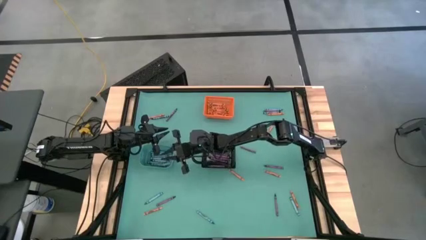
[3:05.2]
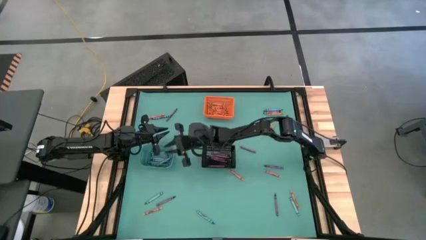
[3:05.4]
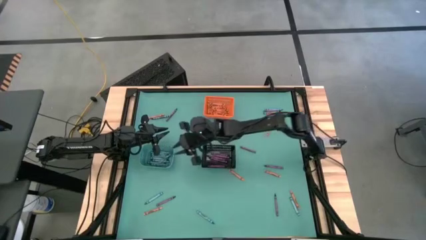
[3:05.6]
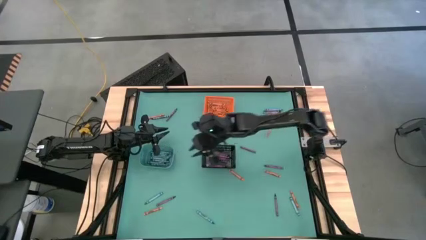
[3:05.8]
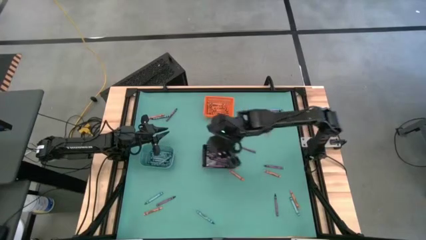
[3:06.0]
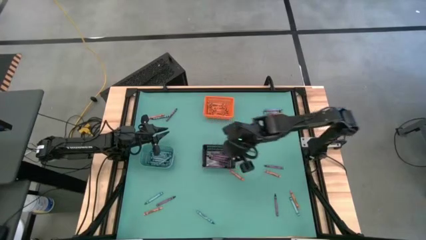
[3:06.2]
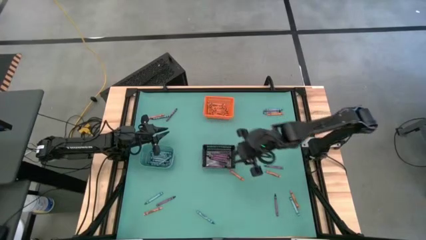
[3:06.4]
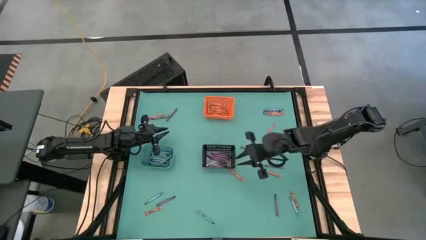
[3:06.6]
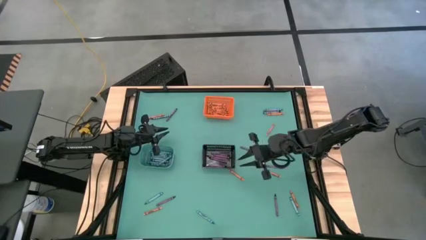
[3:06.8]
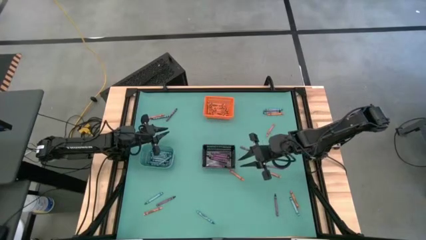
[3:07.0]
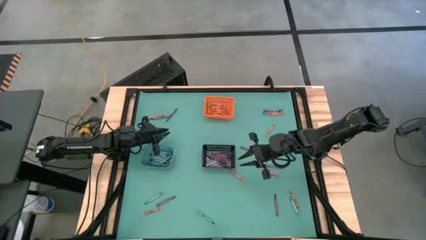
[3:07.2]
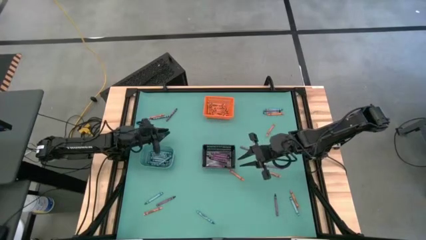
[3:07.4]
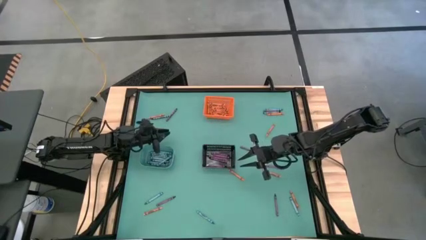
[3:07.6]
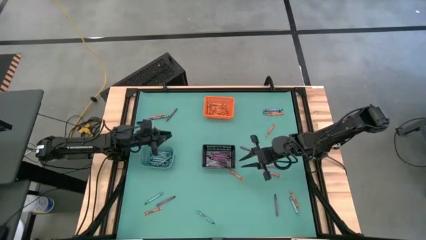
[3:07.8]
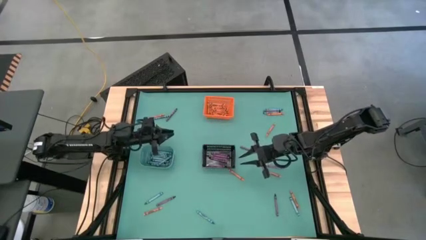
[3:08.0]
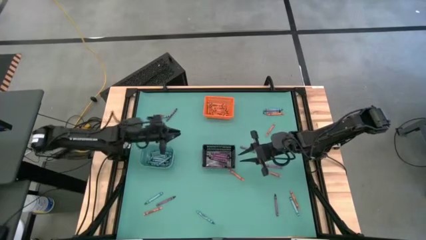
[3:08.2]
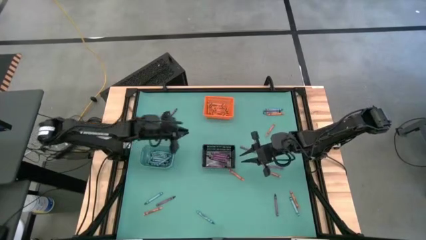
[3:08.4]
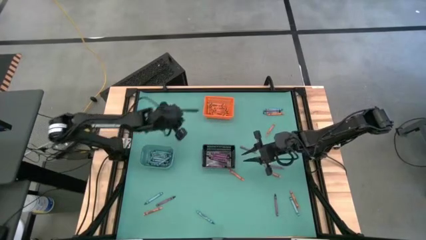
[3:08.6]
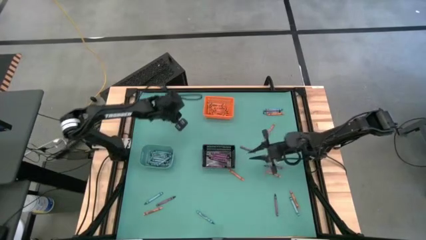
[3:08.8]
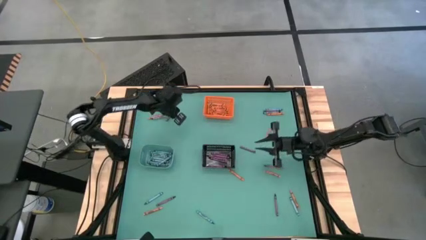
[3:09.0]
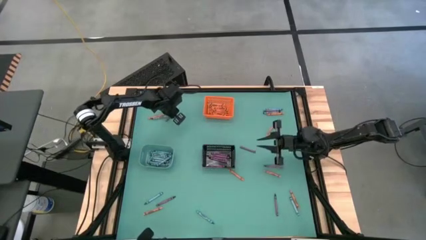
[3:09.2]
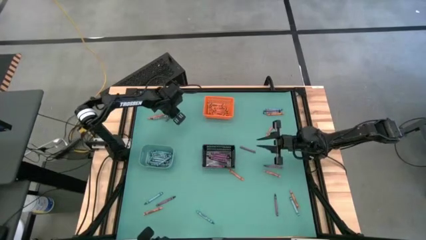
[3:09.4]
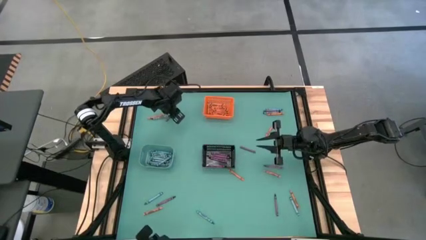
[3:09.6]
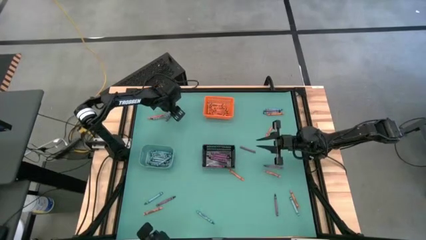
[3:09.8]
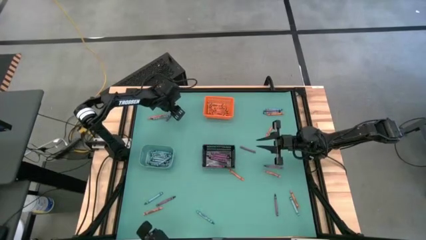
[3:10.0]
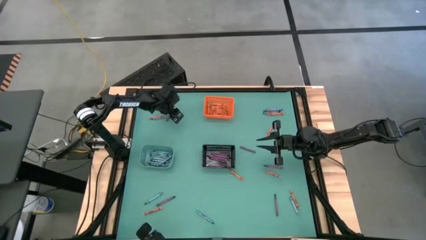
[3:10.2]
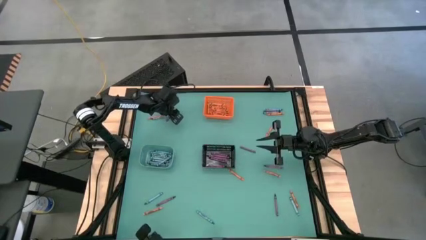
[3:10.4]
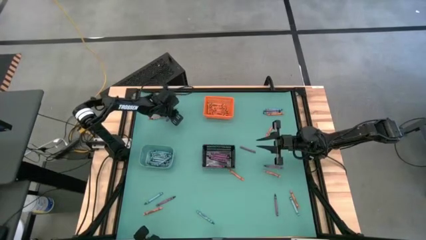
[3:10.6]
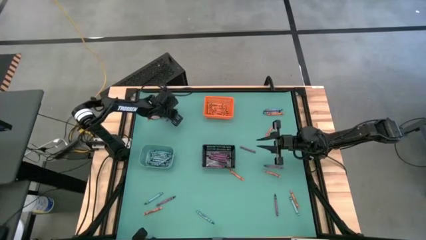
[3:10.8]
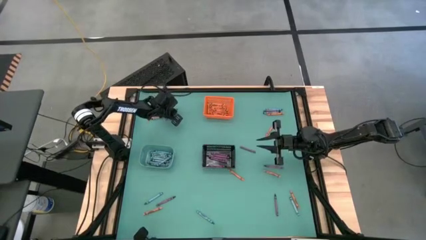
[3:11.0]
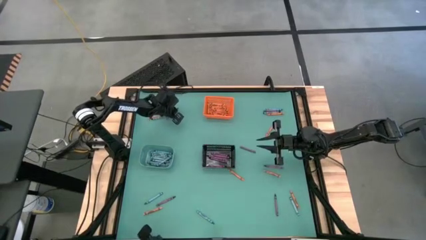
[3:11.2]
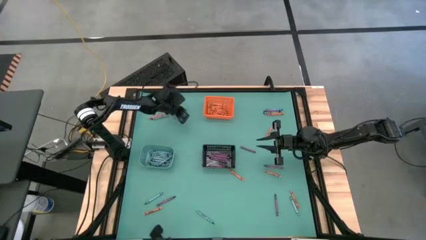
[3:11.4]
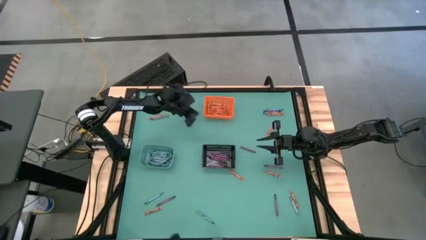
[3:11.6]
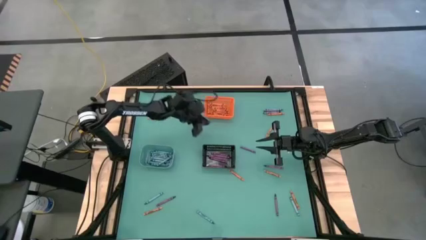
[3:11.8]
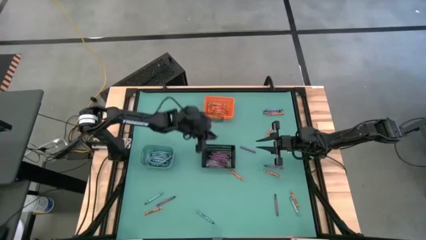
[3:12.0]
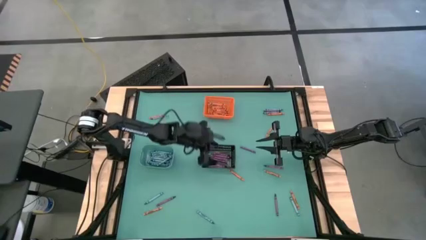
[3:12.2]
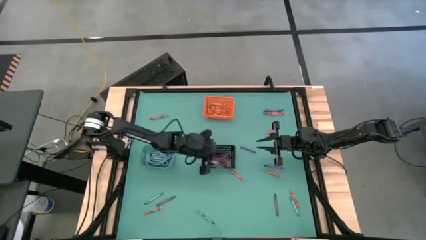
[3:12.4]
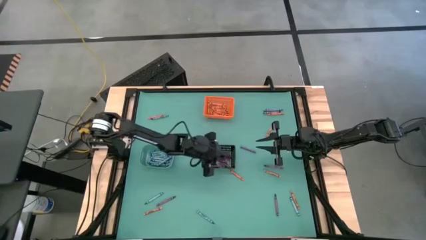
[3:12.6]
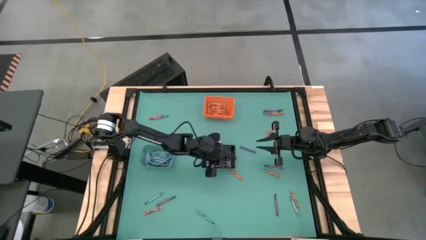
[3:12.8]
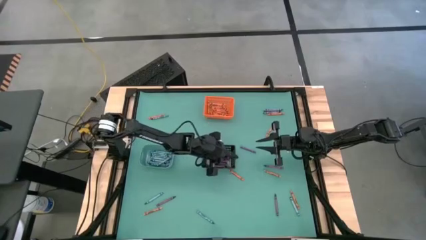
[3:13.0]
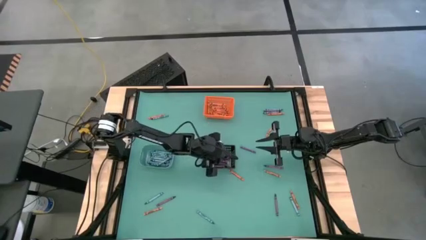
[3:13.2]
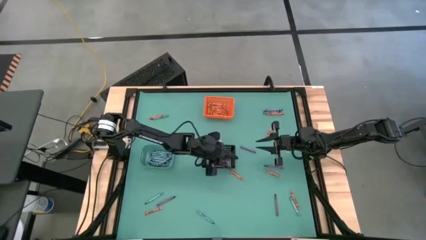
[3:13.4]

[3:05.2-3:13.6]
Task: Sort crayons
Put the violet crayon into the black bin

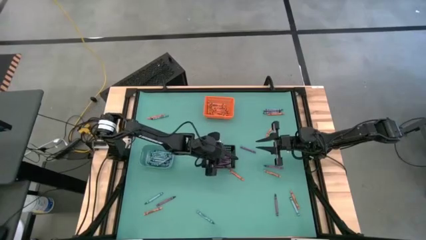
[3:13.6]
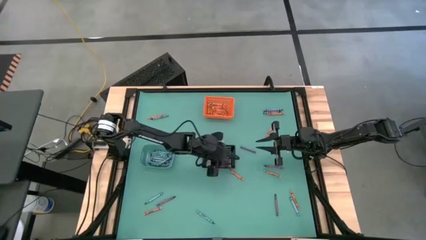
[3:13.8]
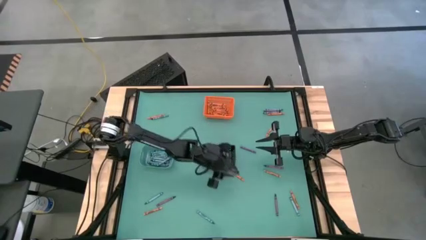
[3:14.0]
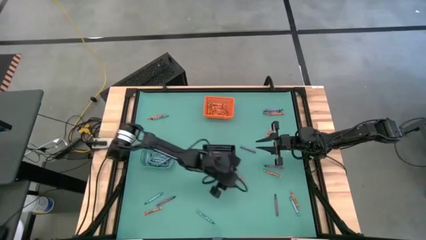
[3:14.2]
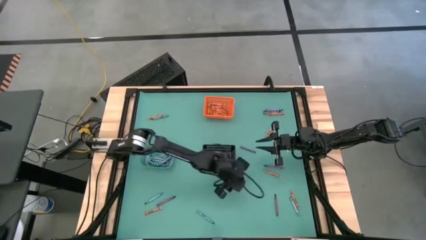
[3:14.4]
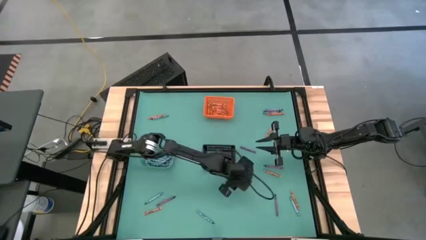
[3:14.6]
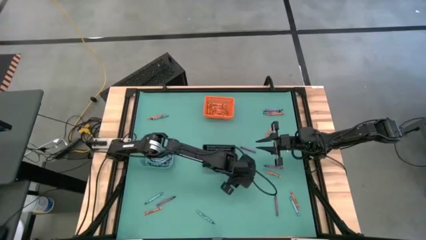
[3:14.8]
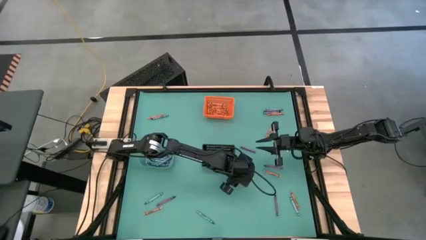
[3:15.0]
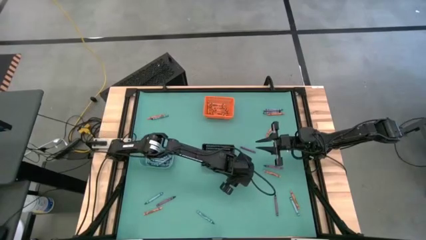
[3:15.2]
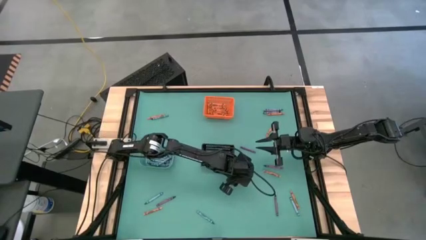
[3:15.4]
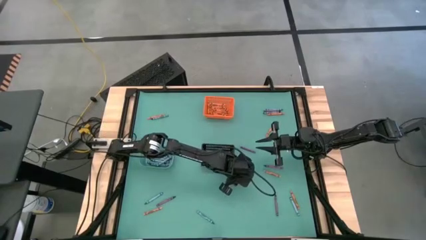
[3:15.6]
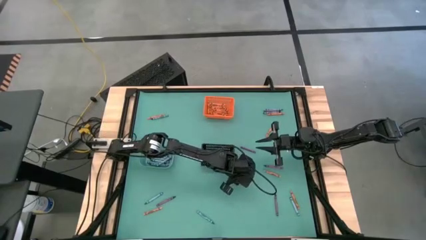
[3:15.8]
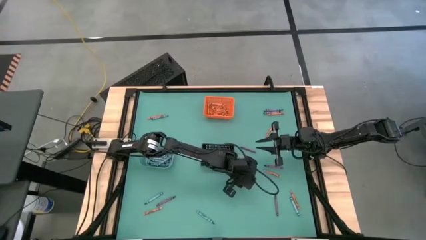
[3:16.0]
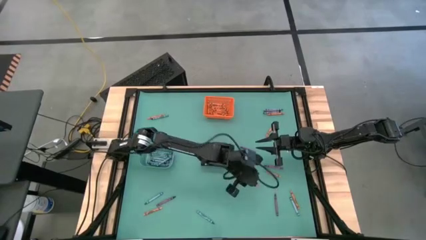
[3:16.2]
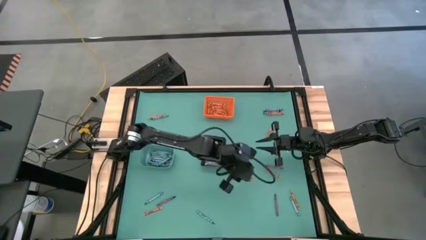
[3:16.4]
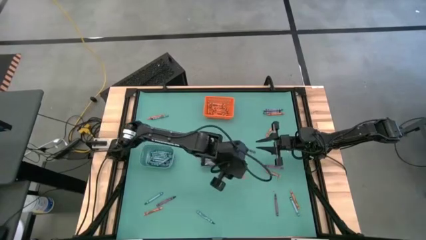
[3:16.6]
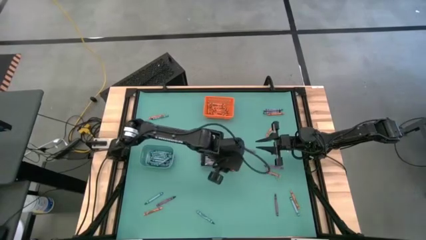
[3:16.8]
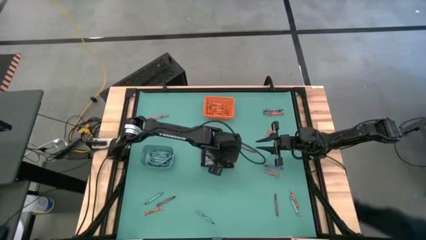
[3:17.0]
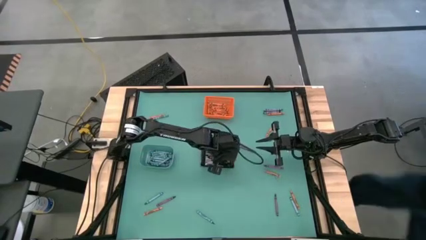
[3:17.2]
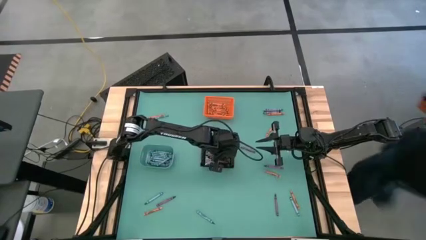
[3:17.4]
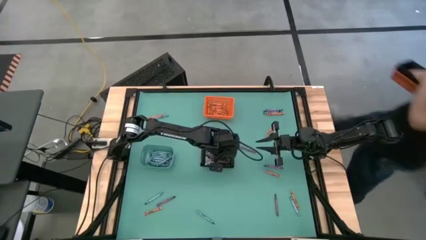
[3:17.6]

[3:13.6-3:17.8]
Put the orange crayon into the orange bin

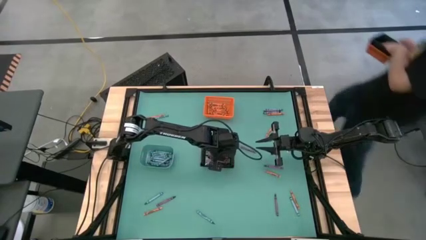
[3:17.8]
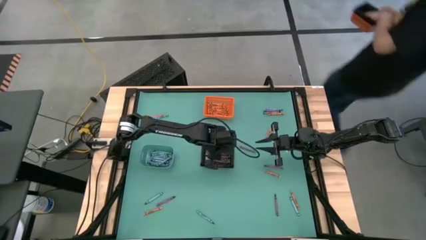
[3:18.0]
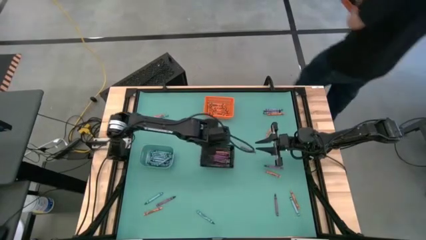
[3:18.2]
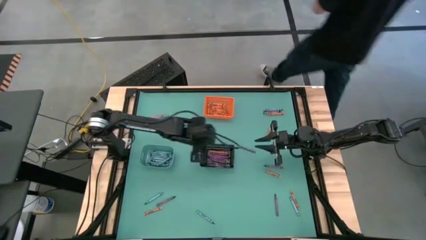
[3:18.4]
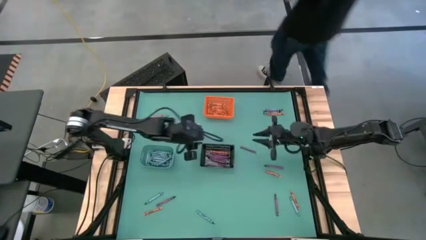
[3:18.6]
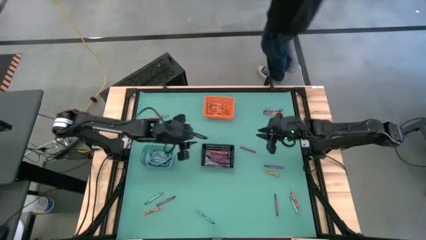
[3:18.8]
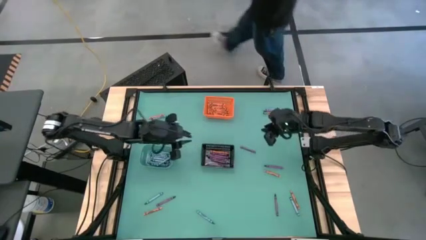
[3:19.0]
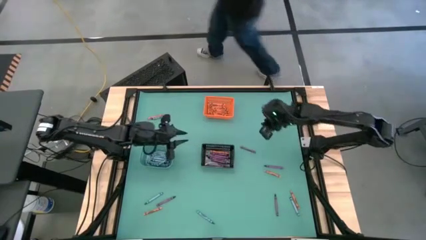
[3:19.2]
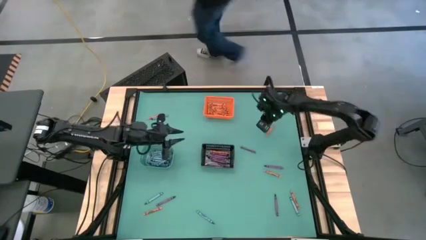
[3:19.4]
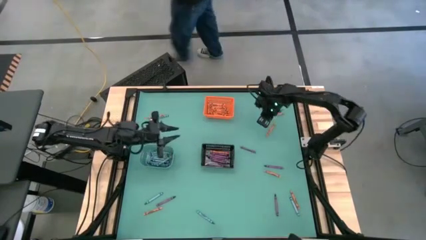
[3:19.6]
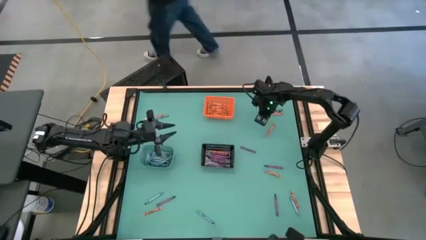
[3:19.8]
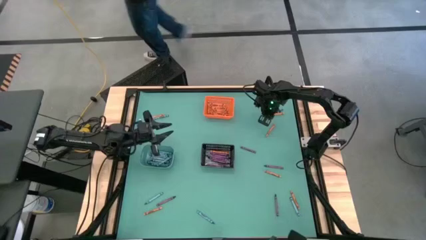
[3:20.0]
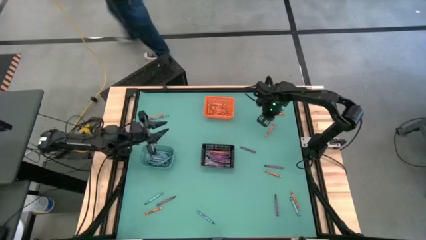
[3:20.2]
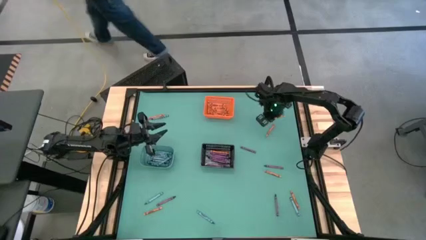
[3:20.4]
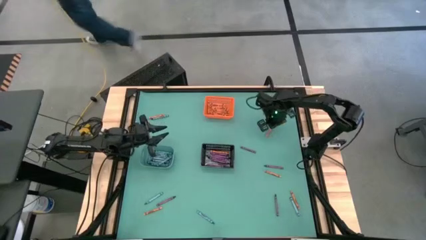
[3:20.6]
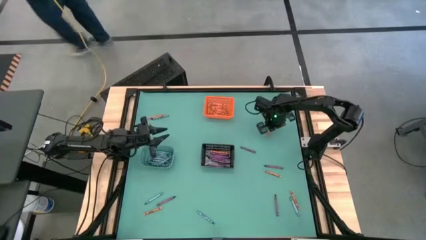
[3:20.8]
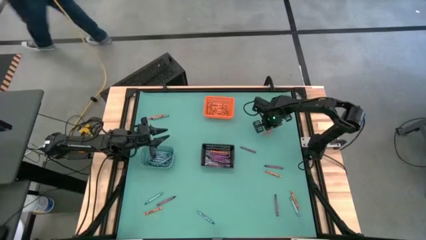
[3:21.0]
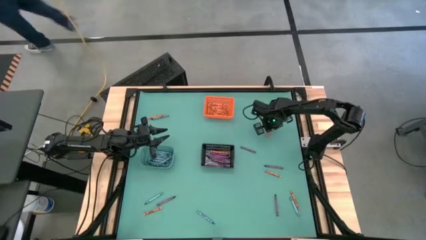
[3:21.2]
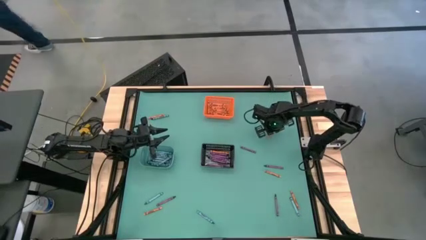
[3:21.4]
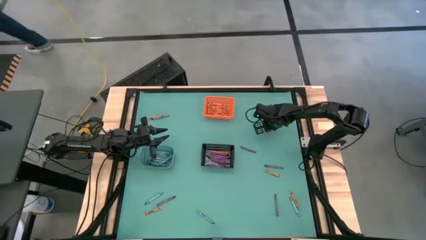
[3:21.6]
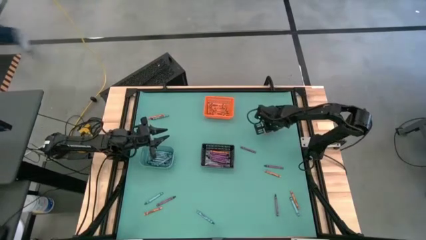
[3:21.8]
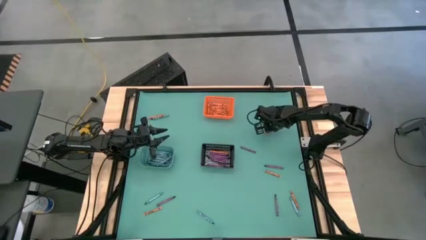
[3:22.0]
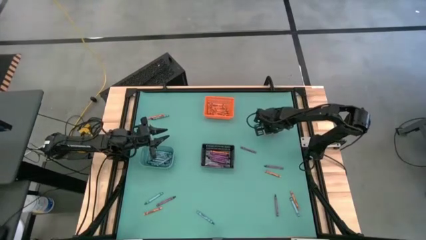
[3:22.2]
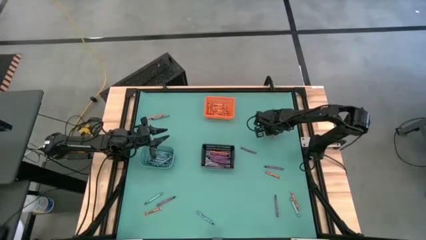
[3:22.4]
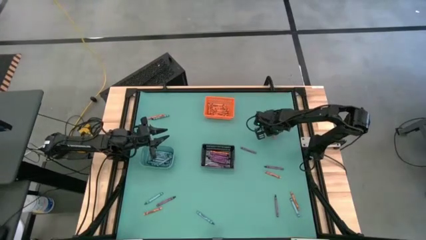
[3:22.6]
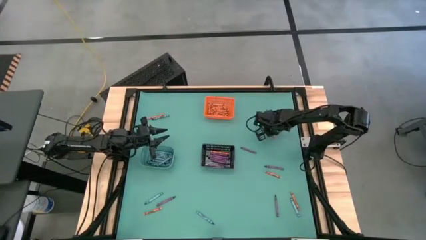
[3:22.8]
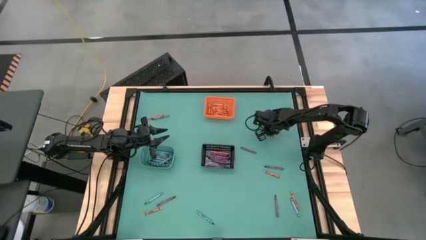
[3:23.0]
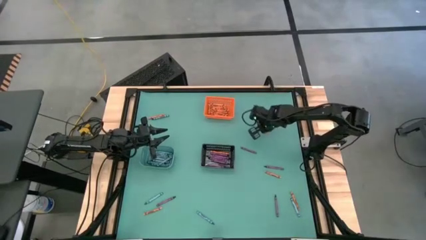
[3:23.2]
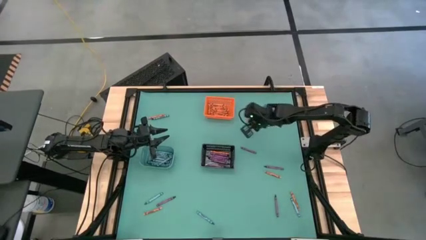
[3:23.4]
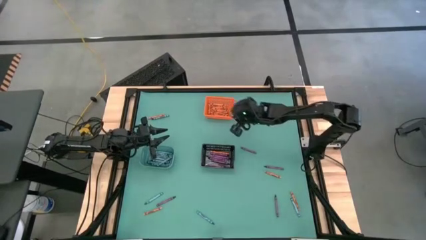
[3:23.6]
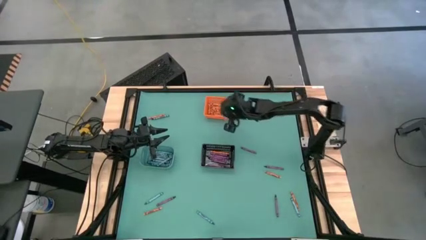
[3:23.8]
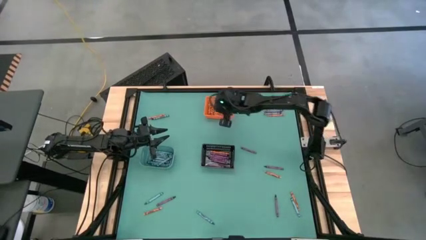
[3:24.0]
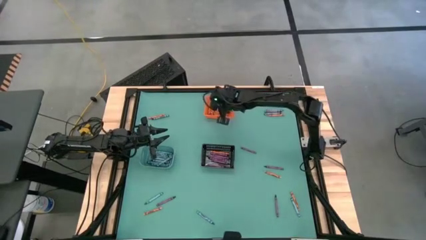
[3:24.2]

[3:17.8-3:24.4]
Put the orange crayon into the orange bin
